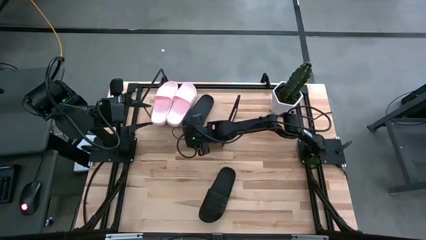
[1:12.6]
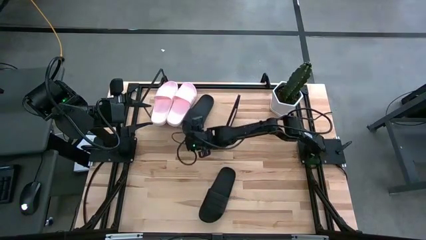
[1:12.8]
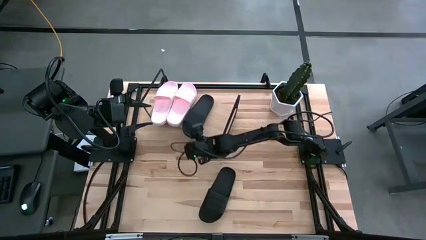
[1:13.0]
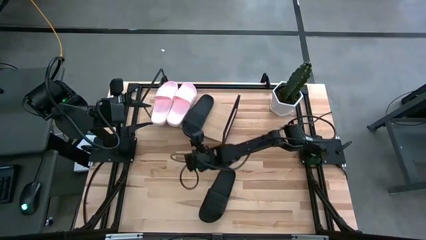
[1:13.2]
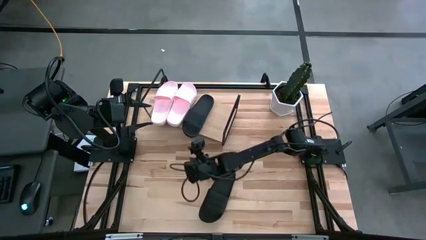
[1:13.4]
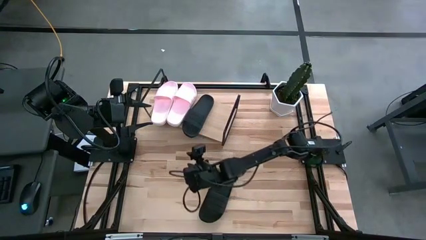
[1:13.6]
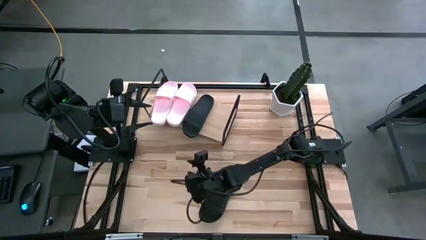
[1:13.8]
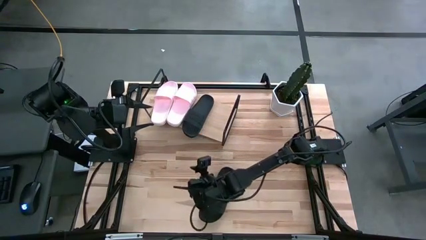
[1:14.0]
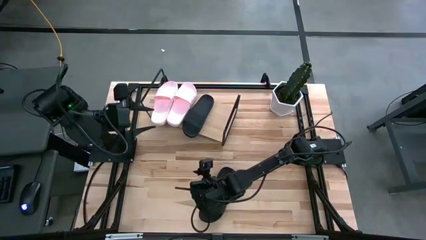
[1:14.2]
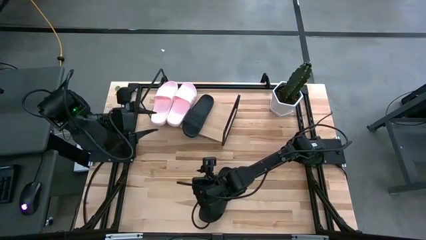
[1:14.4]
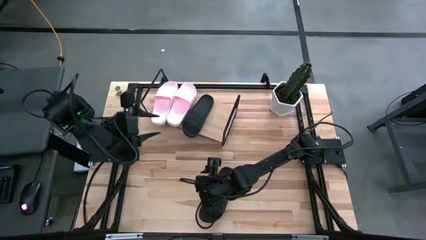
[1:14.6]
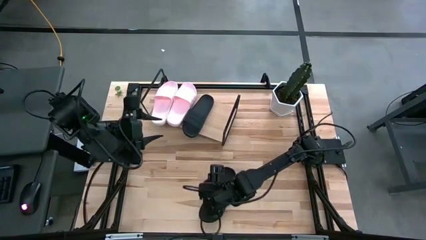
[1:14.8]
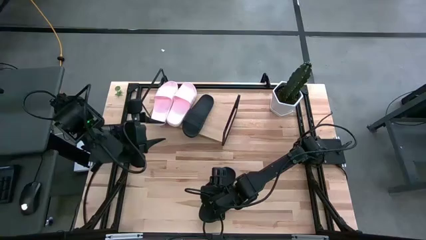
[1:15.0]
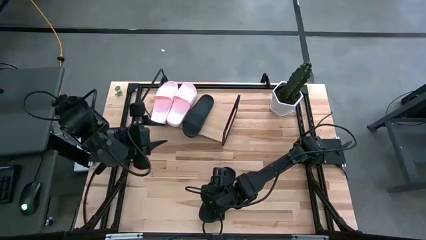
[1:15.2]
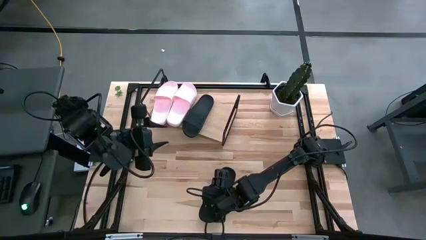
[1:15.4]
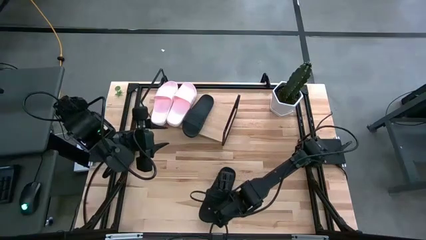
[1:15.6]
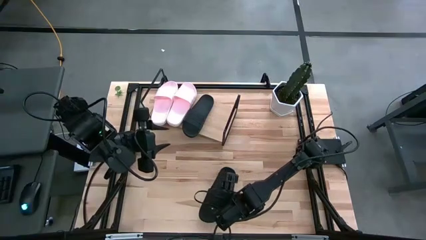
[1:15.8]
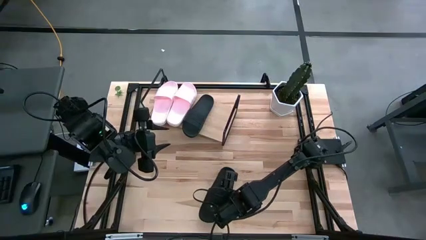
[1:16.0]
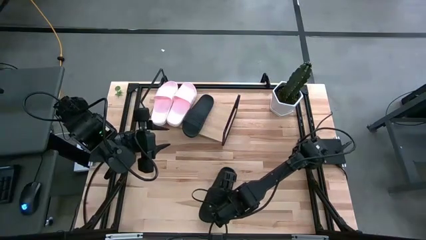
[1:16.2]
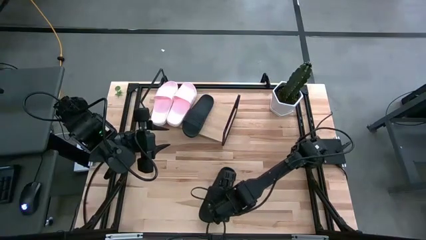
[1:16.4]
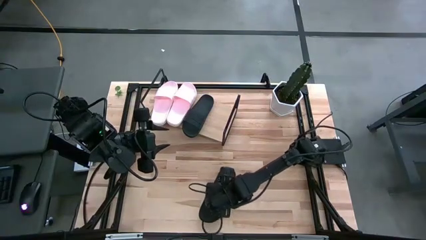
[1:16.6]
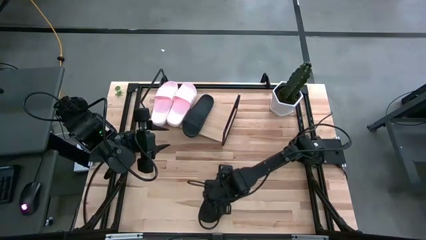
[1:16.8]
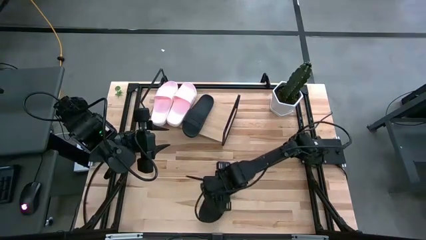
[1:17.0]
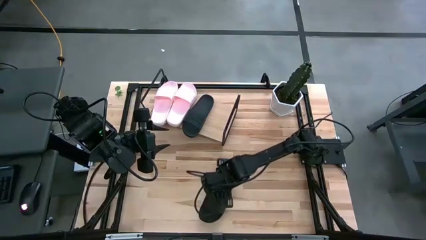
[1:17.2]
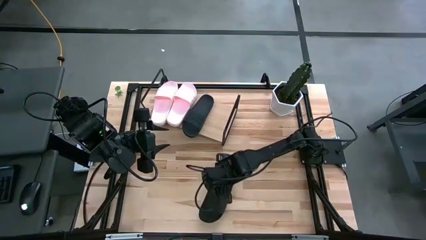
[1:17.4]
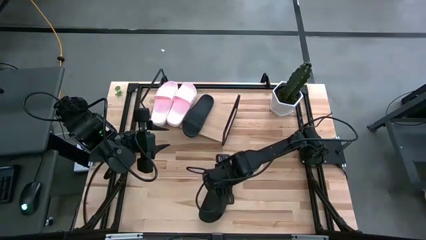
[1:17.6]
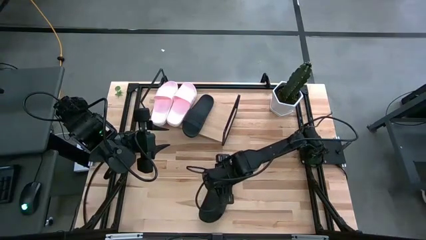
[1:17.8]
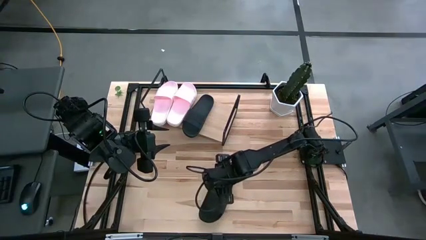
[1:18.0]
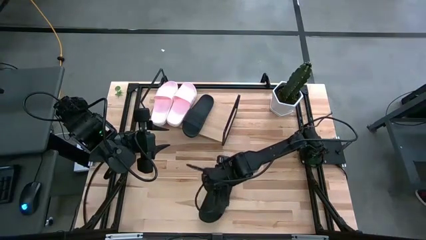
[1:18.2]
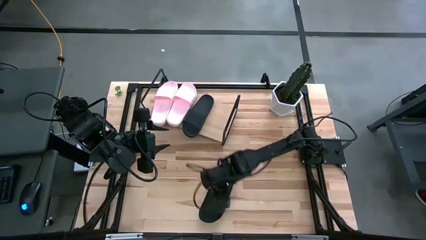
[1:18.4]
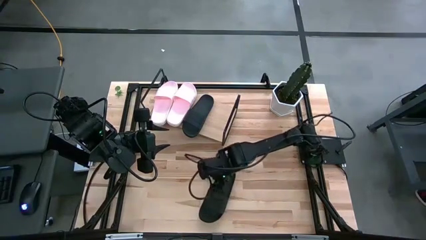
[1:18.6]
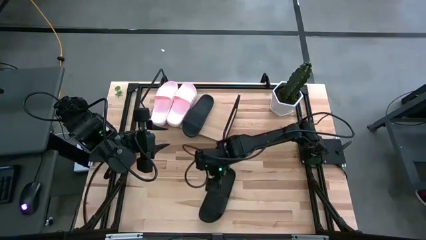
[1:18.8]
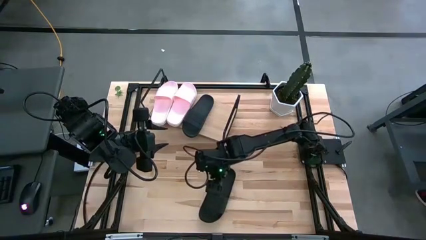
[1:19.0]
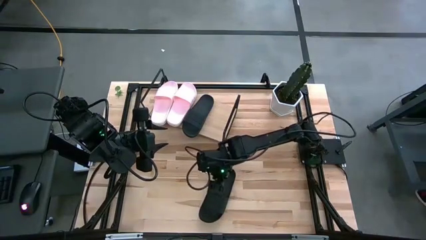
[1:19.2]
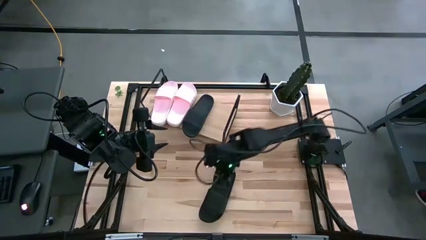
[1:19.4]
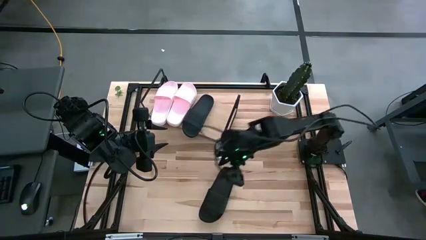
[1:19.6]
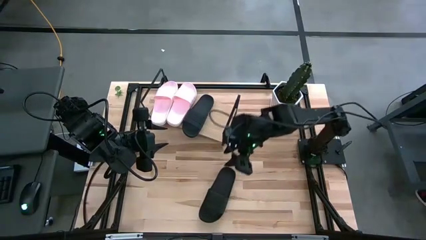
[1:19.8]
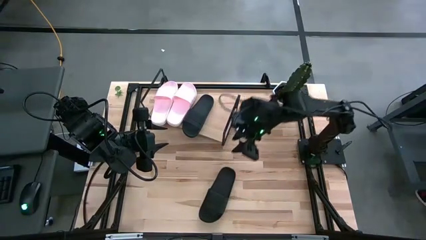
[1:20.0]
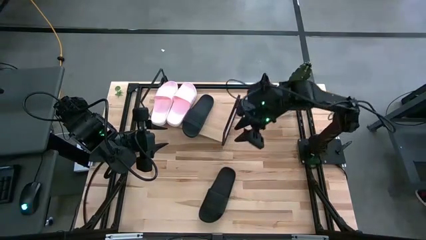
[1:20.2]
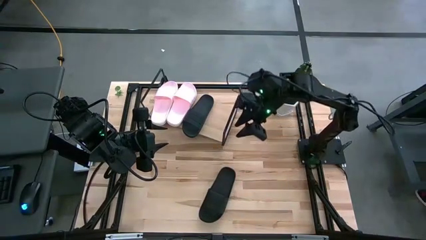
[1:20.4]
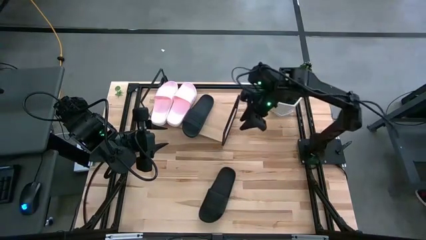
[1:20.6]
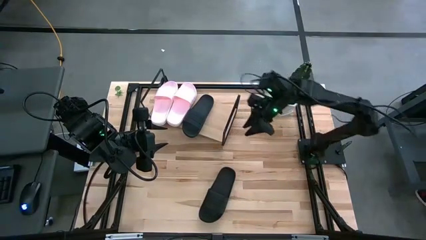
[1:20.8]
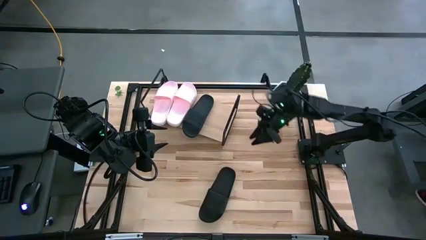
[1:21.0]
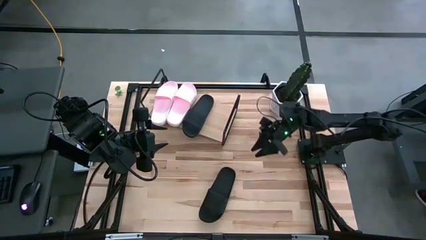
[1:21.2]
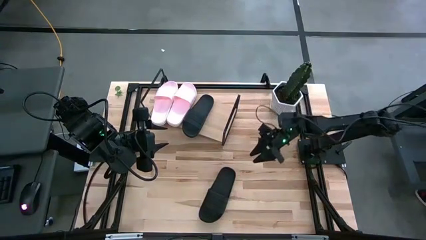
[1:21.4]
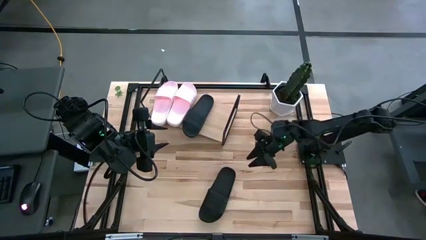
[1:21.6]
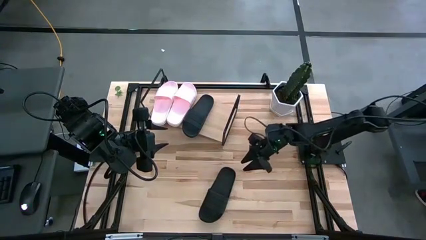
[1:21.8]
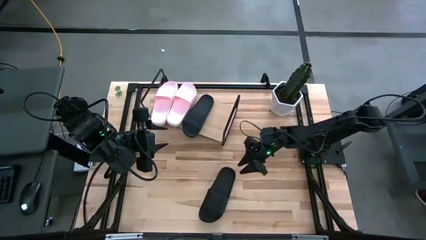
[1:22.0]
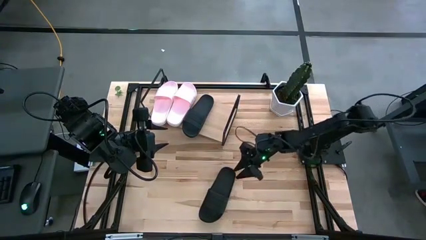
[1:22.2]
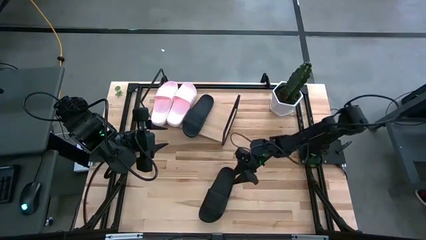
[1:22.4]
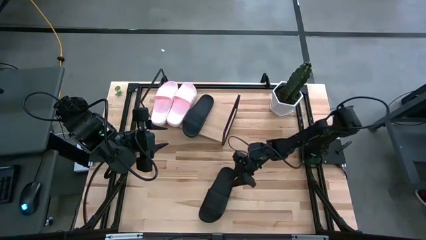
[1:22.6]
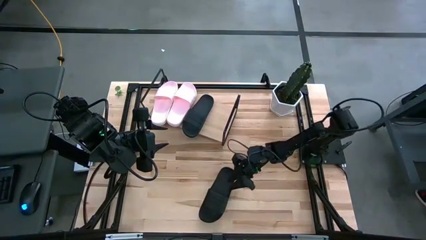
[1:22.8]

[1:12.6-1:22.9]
Task: Pick and place slides into the shelf
Put the black slide on the shelf

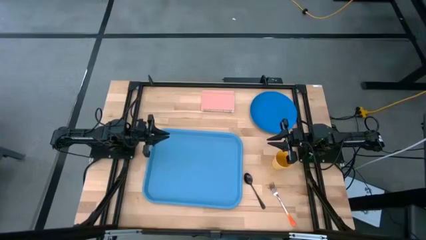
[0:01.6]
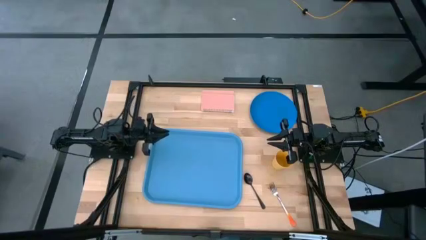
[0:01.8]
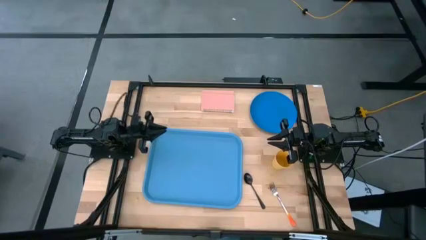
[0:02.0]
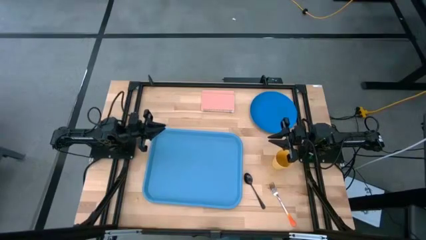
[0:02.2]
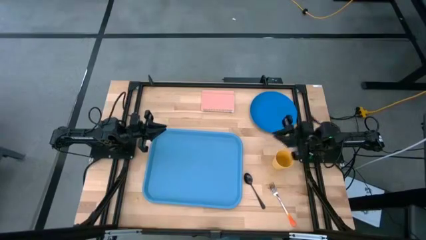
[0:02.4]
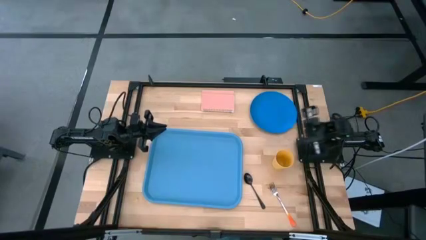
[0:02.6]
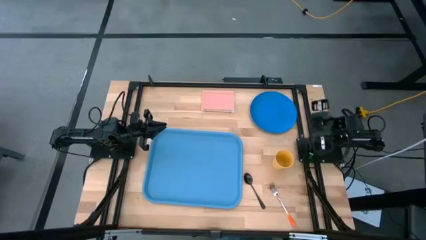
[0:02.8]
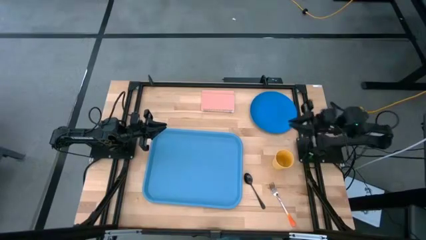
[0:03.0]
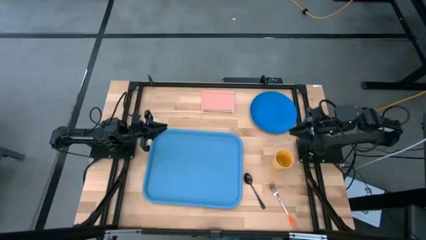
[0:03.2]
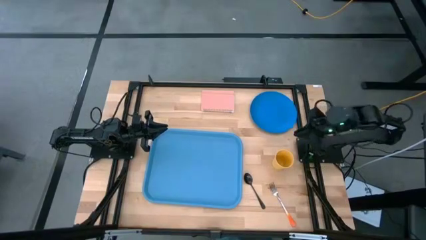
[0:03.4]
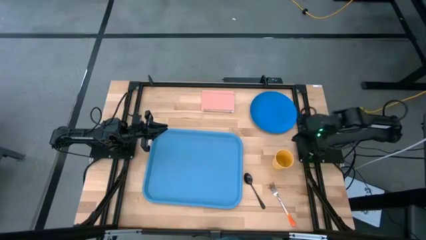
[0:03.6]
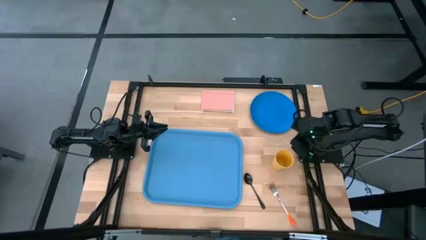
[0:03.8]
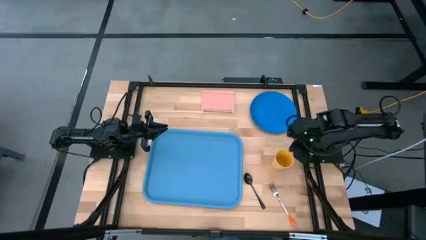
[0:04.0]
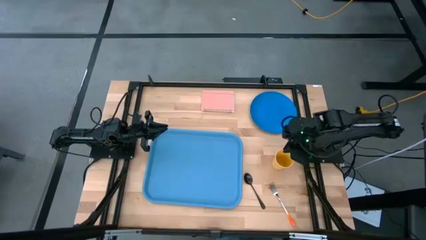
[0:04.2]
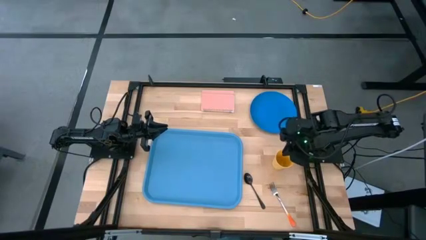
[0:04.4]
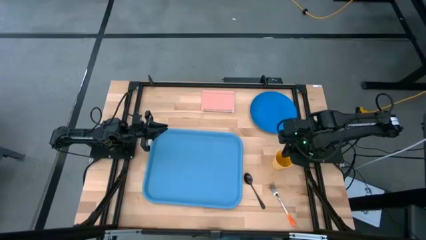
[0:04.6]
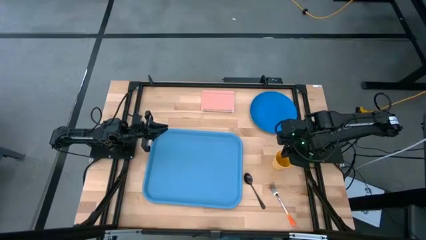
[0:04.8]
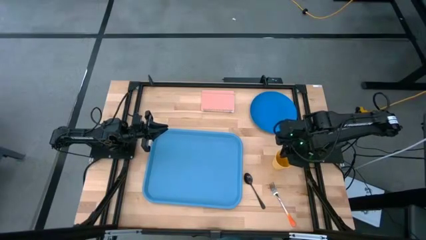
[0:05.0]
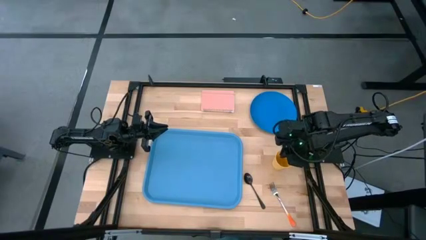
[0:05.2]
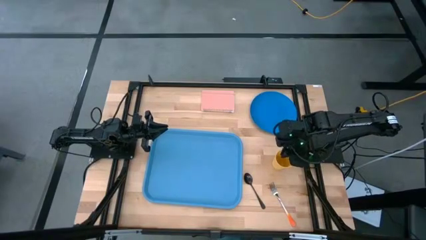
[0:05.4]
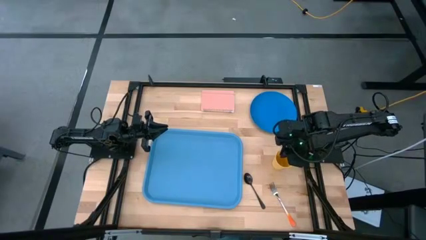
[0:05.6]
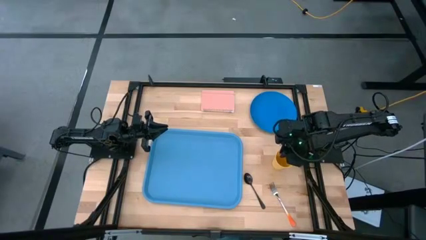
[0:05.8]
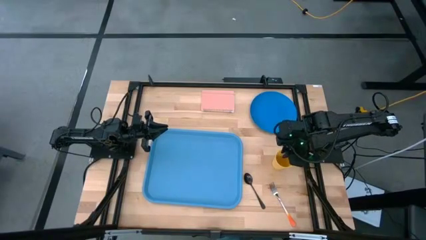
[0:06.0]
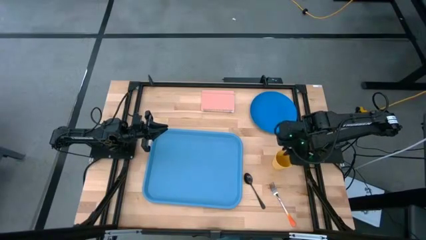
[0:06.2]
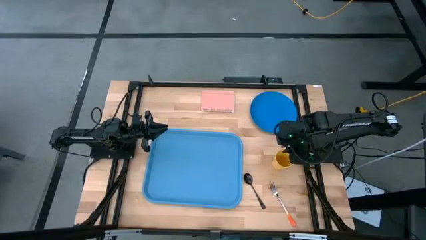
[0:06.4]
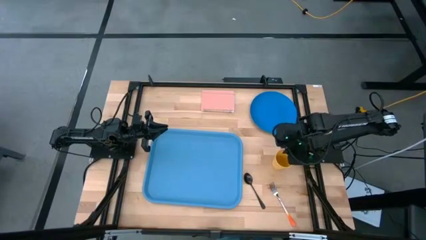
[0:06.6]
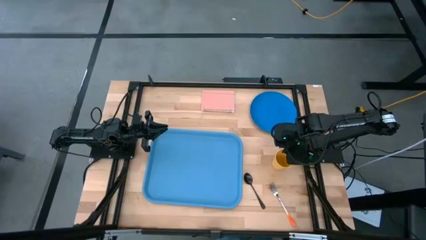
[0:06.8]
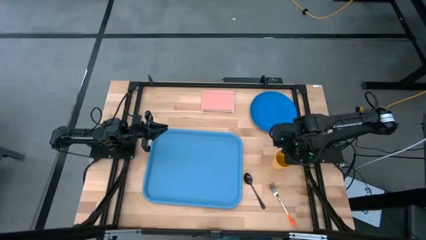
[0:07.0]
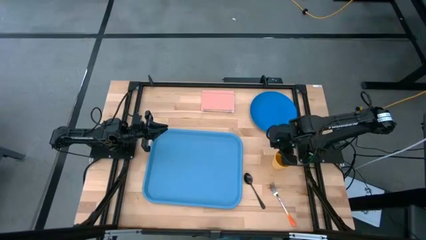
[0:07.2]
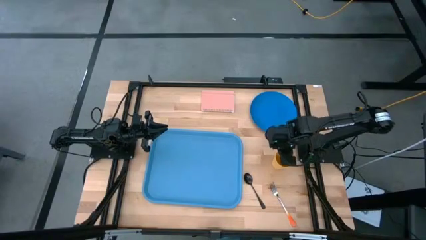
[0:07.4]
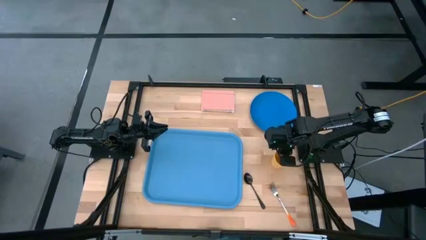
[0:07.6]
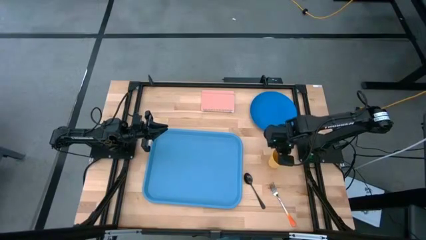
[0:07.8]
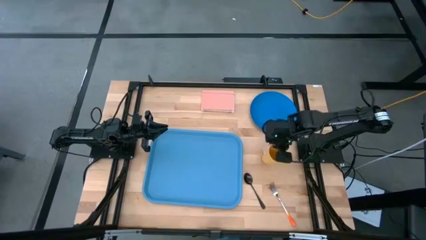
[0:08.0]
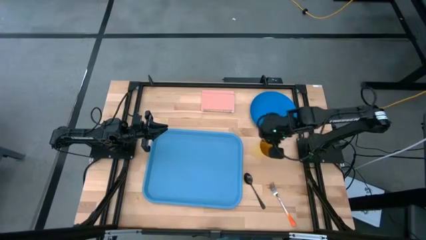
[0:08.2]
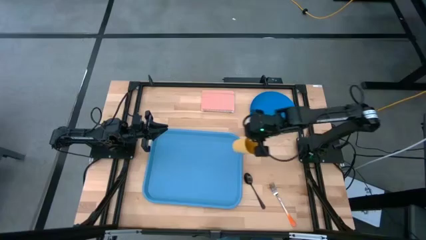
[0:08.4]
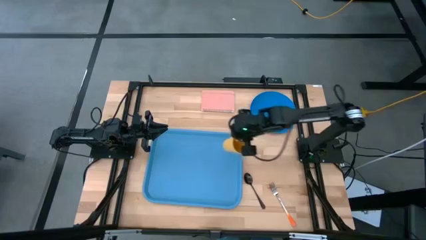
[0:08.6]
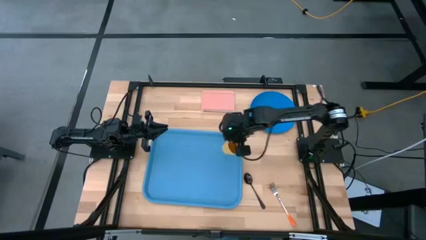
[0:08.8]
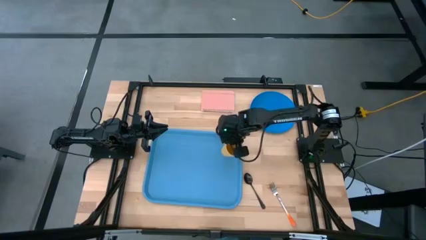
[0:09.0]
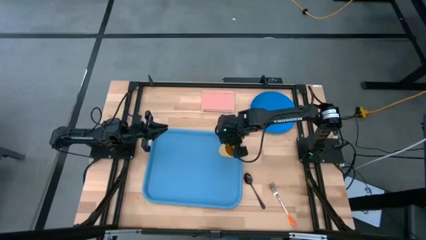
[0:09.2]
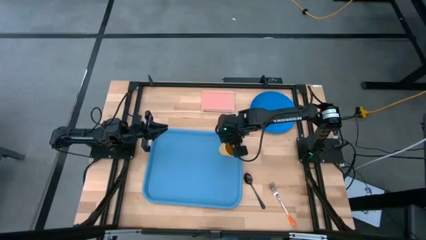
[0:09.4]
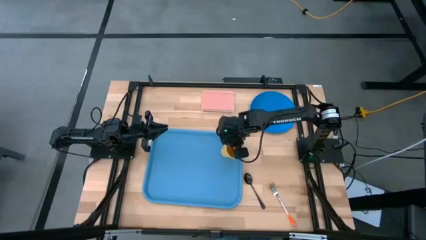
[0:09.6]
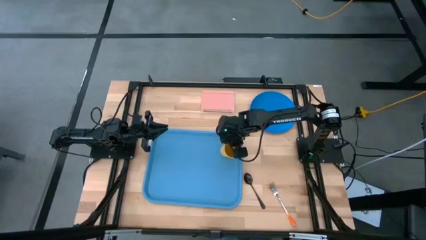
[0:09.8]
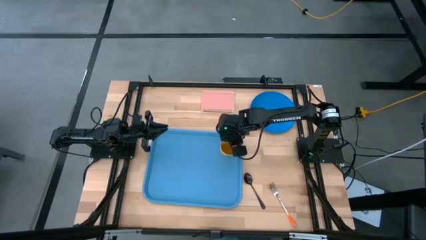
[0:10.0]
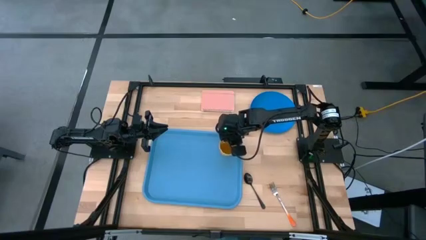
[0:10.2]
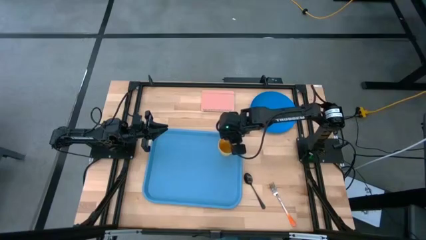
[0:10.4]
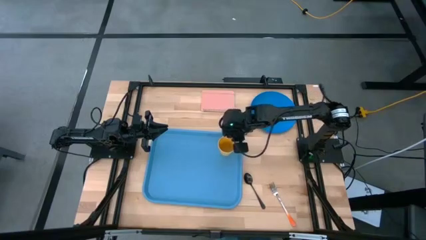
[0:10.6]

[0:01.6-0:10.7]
Task: Pick and place plate/cup/fork/spoon on tray
Put the yellow cup on the blue tray
